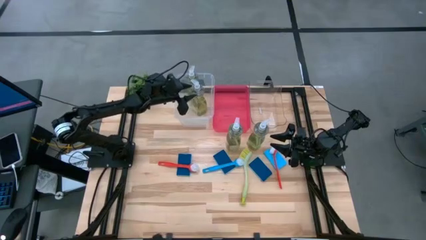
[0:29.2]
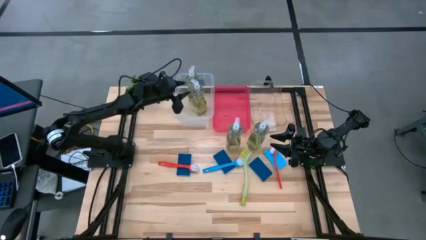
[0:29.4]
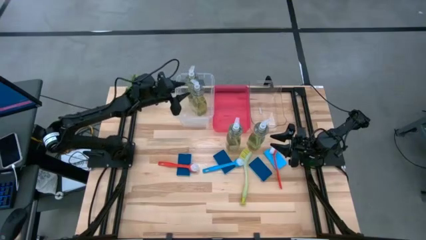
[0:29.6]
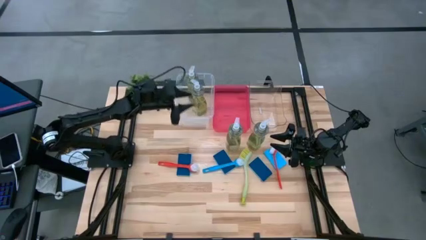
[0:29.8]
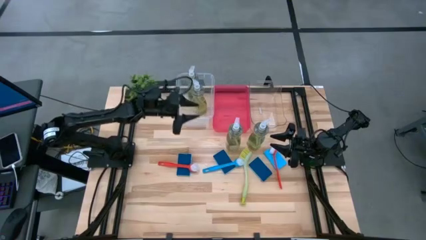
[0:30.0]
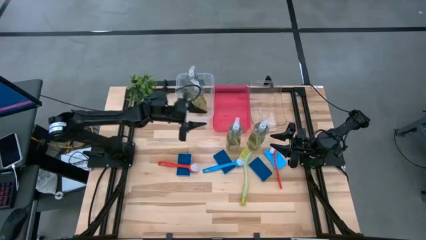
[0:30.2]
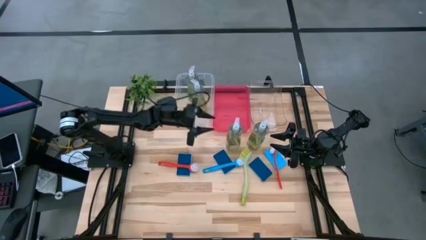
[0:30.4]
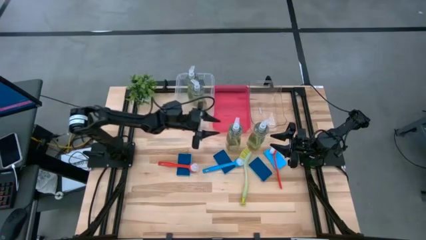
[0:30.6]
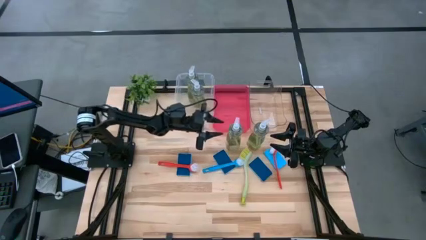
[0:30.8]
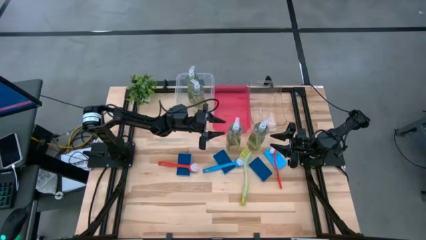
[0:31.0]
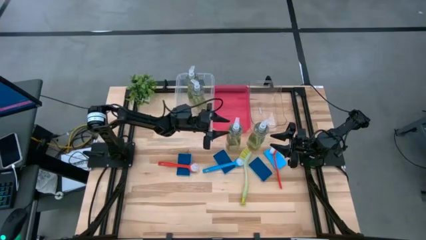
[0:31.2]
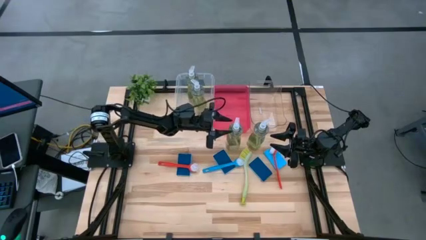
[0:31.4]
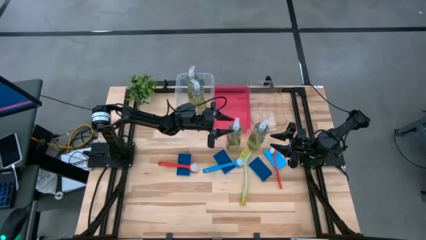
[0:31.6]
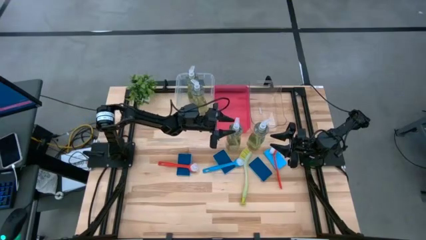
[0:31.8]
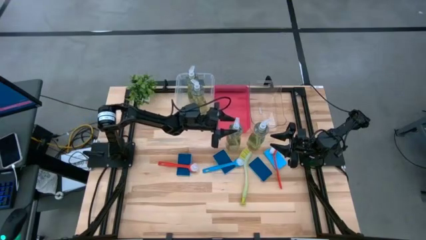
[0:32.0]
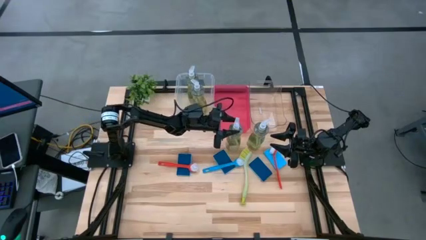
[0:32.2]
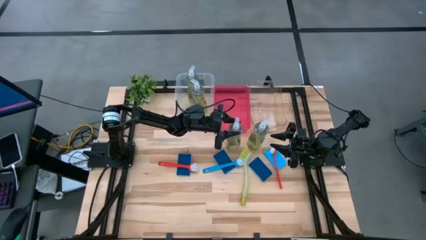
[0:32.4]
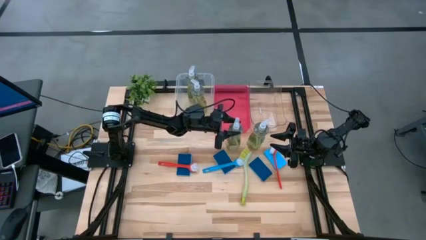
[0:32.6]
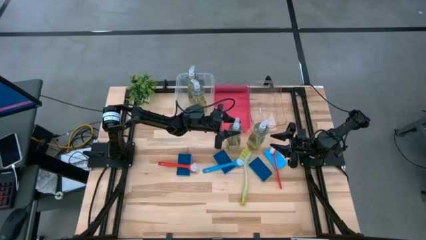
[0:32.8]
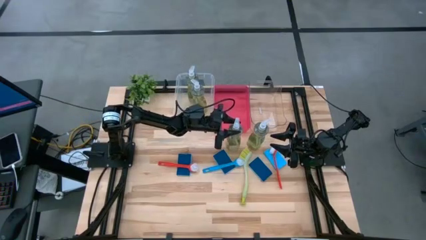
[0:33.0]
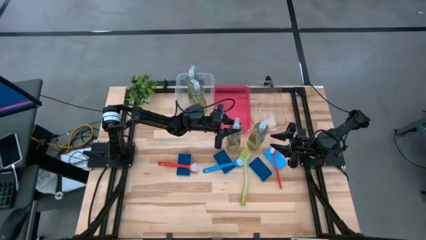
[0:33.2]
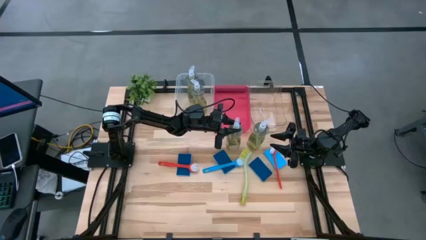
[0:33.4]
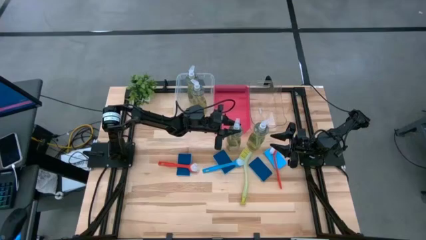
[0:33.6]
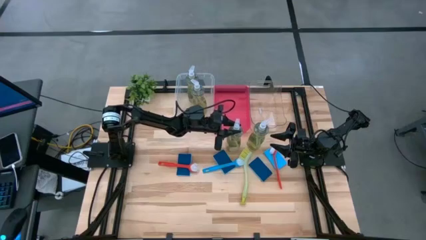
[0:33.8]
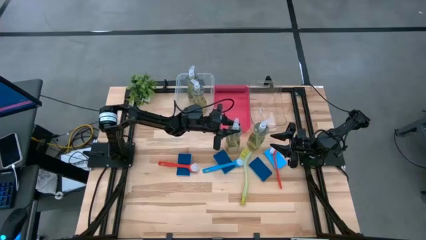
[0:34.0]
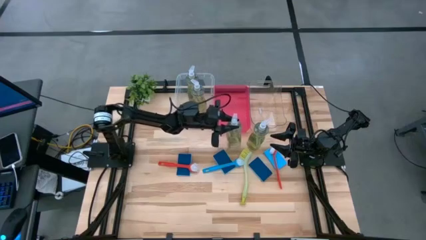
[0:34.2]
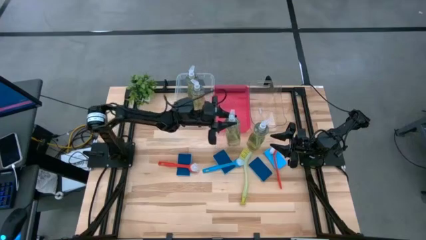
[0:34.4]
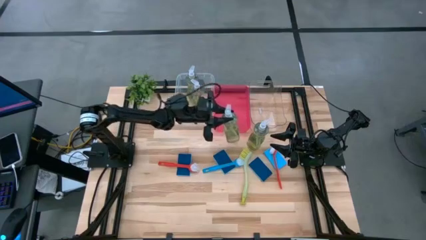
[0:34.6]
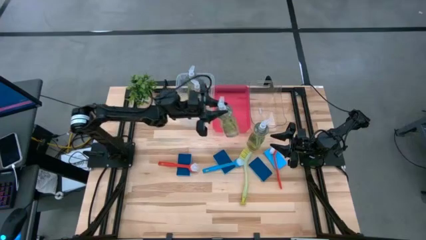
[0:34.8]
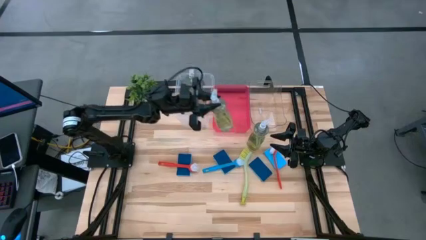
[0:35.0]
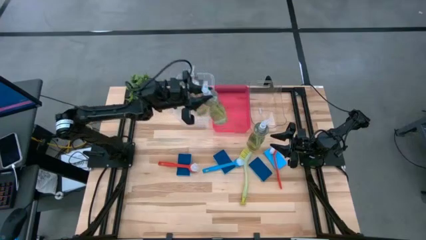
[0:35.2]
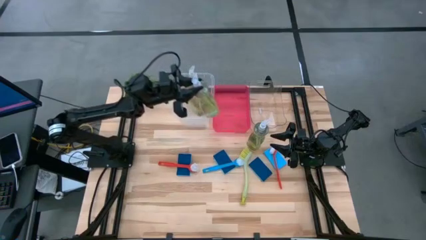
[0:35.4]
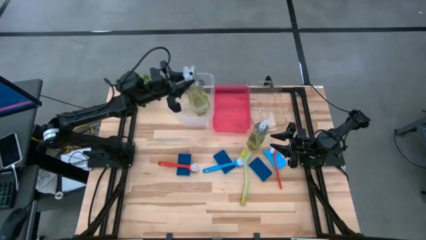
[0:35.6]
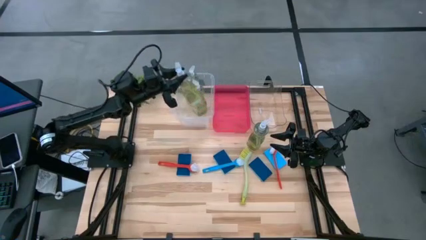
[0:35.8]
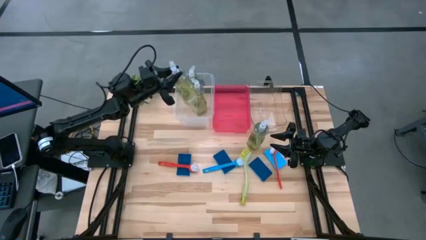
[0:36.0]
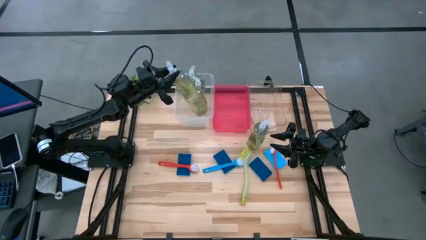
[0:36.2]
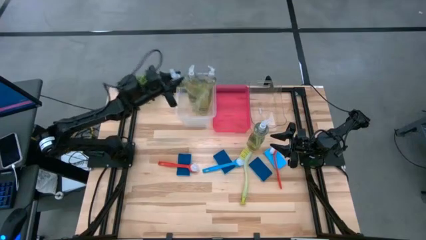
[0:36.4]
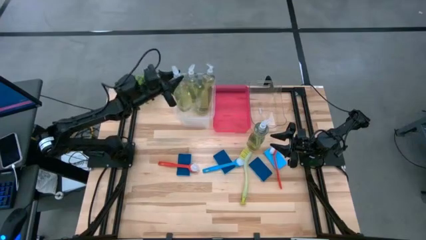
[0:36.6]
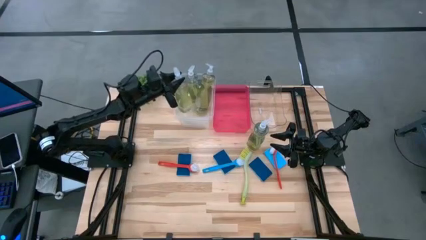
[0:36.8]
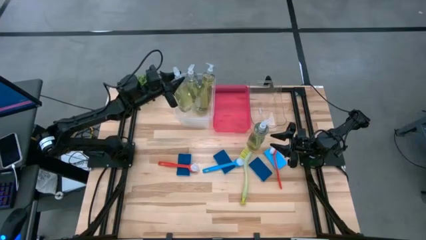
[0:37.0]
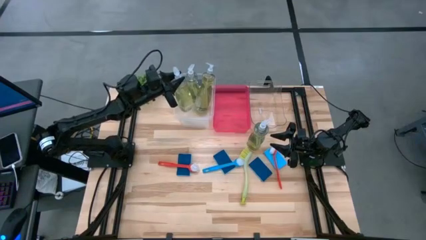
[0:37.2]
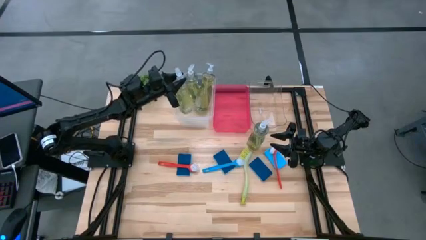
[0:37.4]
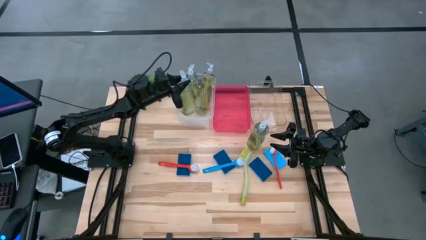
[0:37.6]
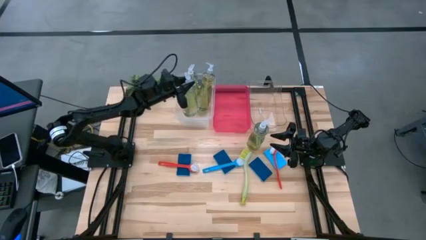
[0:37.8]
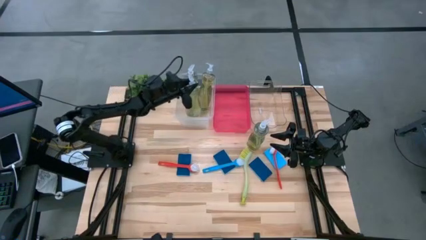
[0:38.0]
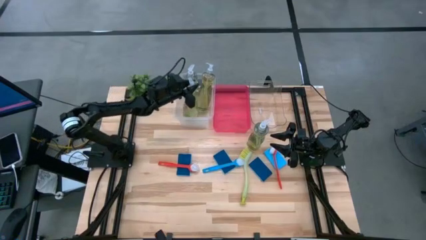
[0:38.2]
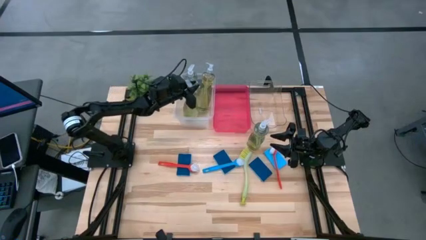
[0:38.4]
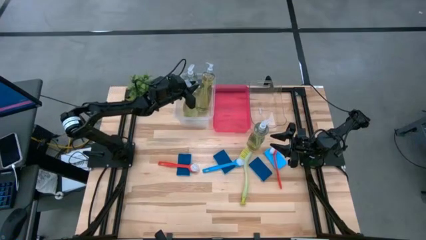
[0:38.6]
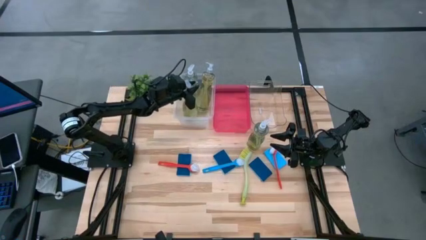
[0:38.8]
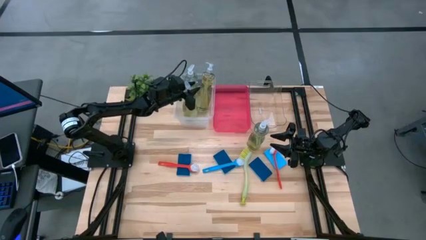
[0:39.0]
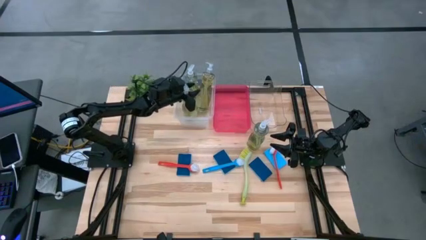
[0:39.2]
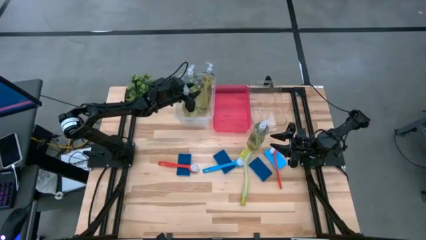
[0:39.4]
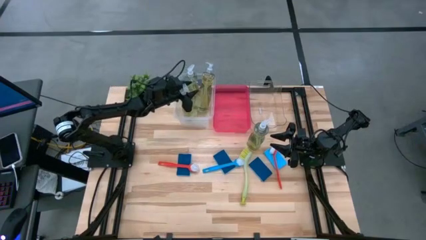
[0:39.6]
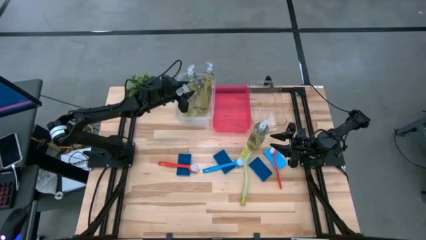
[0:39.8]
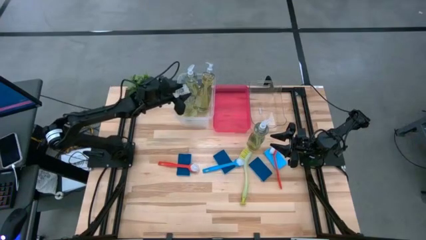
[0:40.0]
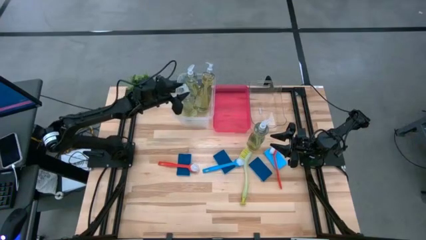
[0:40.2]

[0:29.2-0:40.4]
Task: Pick & Place Kitchen Sink Supplies
Put the yellow dish soap into the transparent container

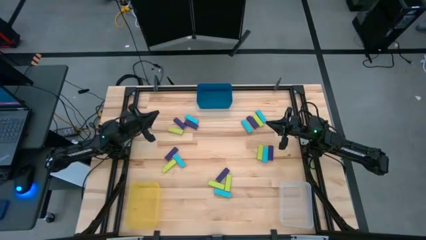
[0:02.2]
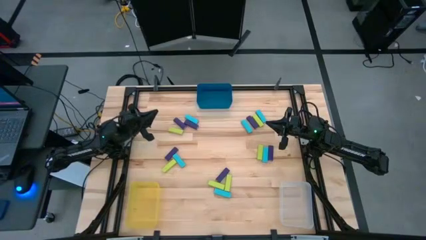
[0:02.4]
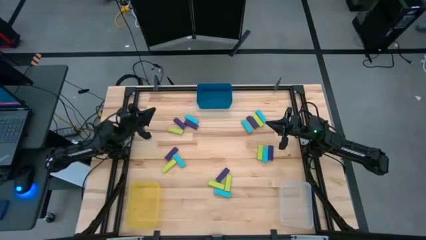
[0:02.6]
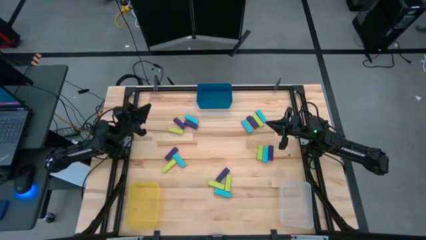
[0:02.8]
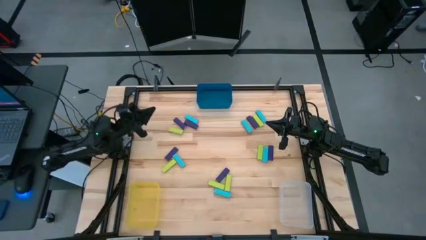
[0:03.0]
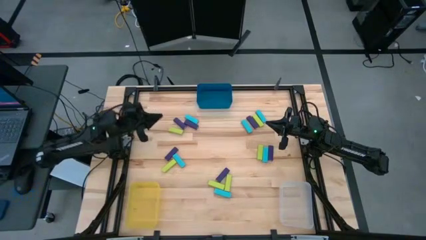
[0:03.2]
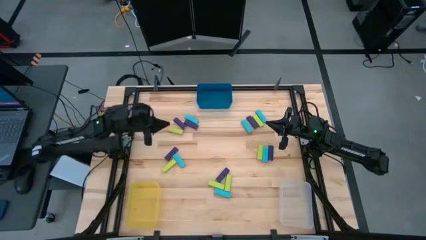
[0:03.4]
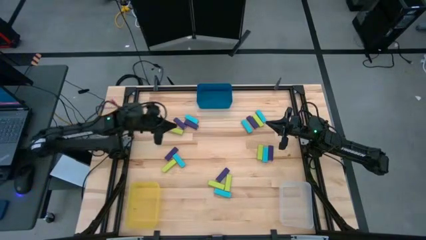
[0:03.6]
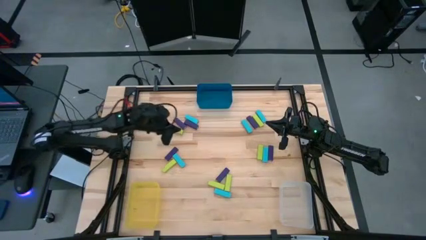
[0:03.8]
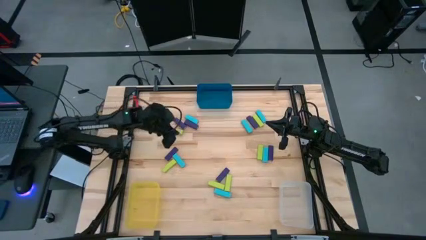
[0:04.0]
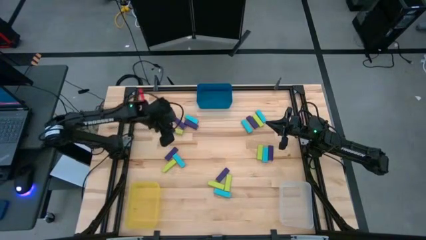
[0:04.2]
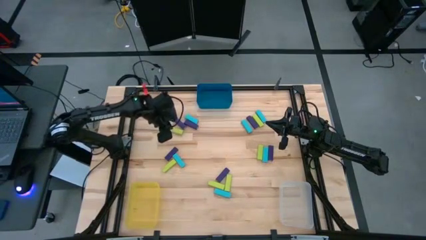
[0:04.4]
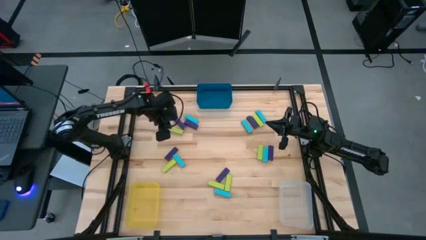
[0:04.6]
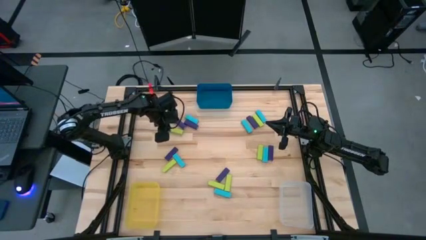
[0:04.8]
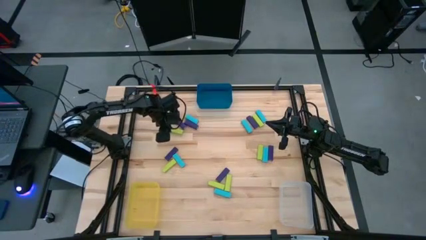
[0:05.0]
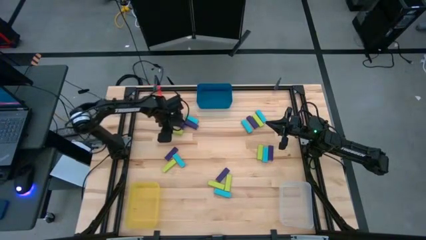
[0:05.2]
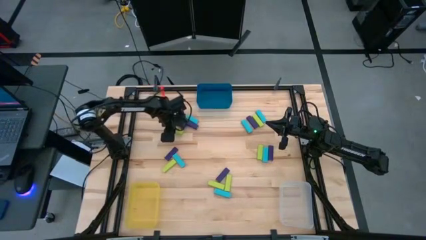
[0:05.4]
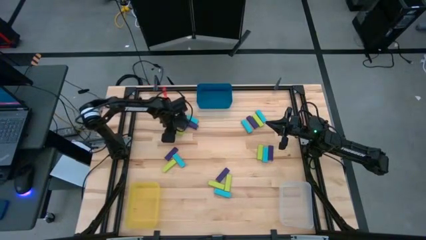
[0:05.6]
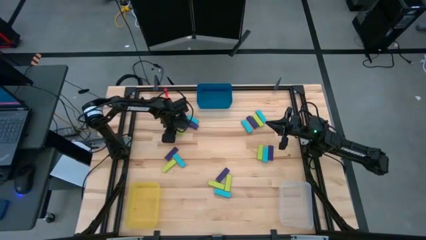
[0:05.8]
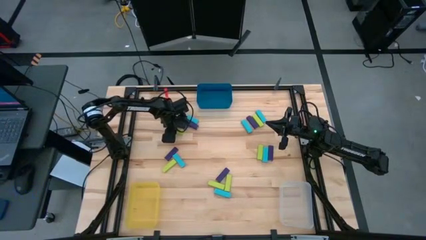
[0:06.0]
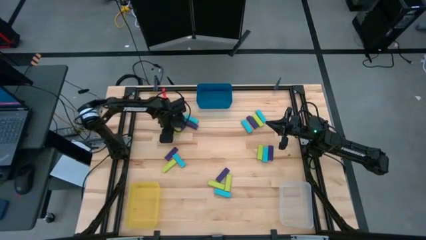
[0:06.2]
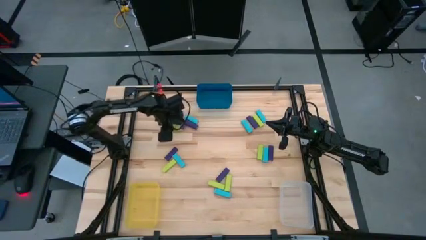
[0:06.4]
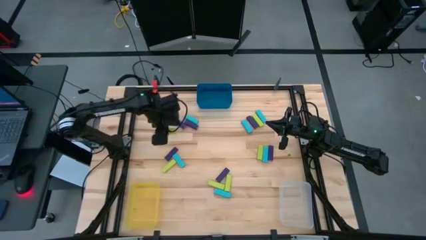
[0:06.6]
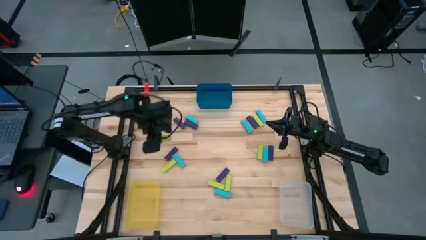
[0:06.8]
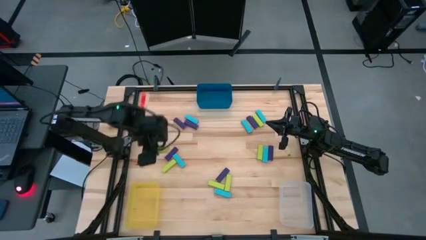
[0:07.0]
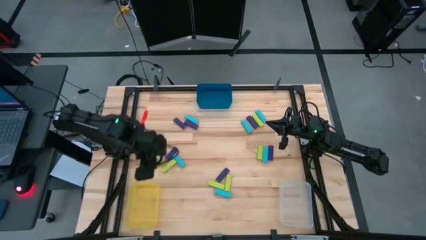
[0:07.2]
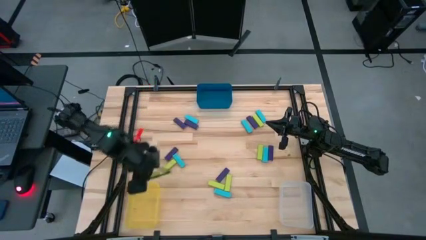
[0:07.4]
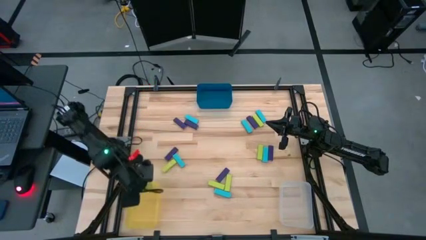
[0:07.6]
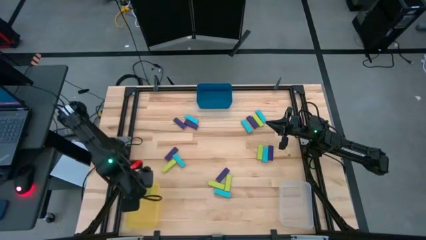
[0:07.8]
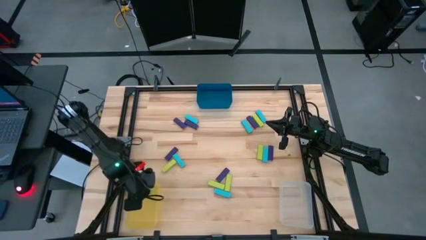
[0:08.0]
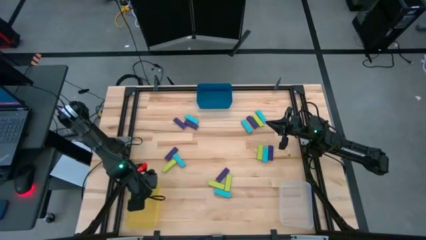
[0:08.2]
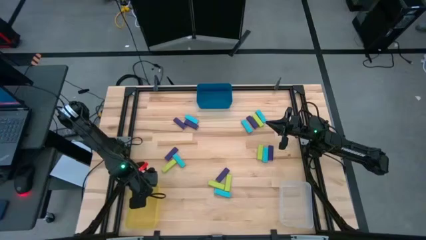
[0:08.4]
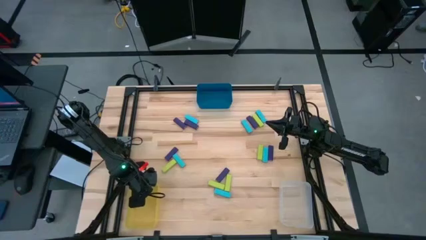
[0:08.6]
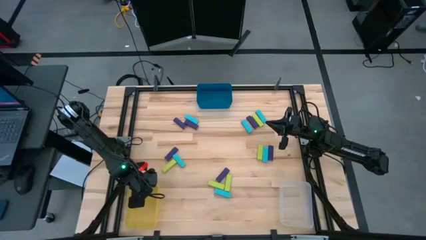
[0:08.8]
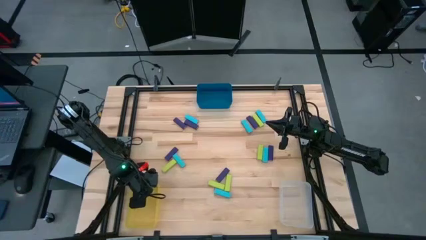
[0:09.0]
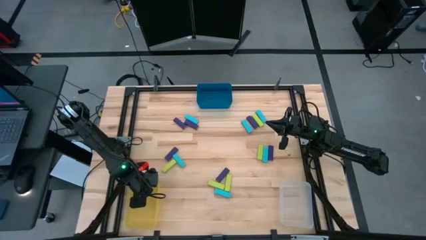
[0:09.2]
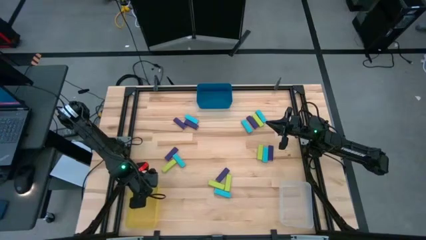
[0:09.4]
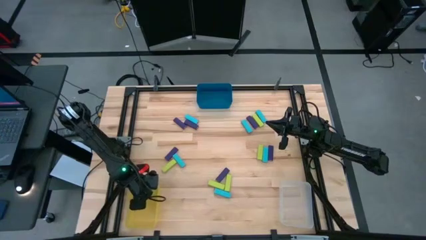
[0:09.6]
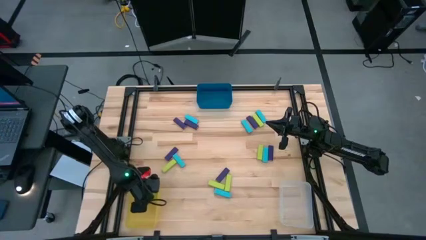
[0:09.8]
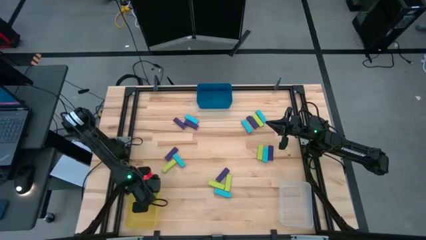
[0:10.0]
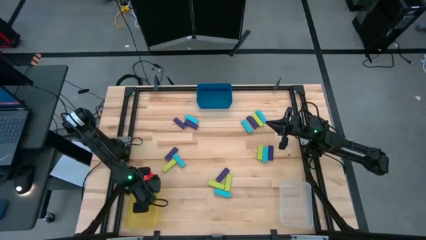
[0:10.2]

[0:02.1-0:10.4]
Task: Sort blocks
Put the top left yellow green block into the yellow bin
